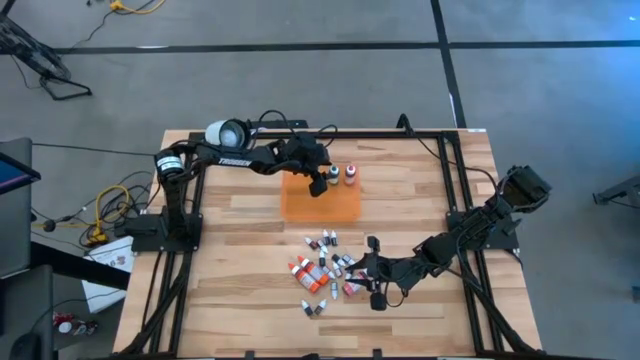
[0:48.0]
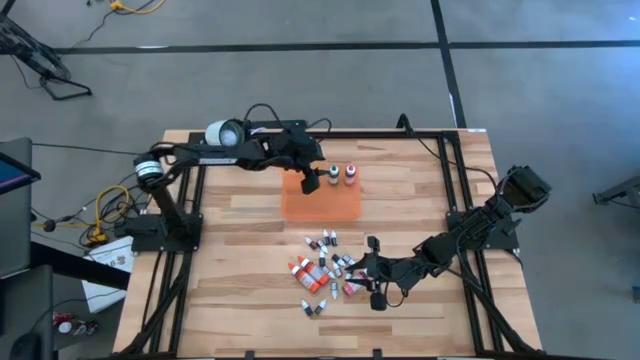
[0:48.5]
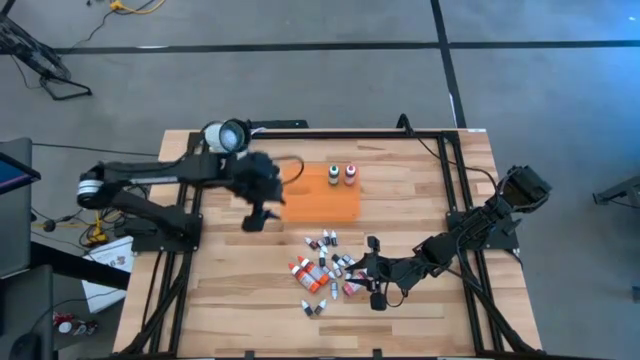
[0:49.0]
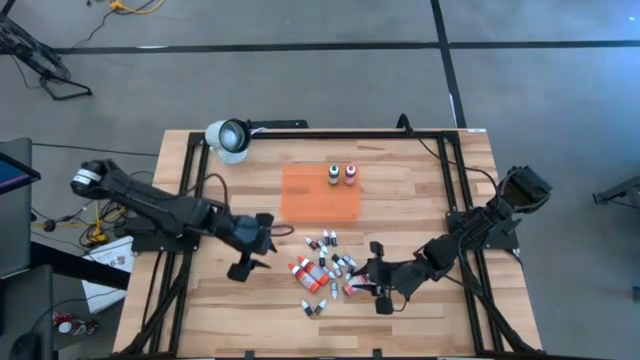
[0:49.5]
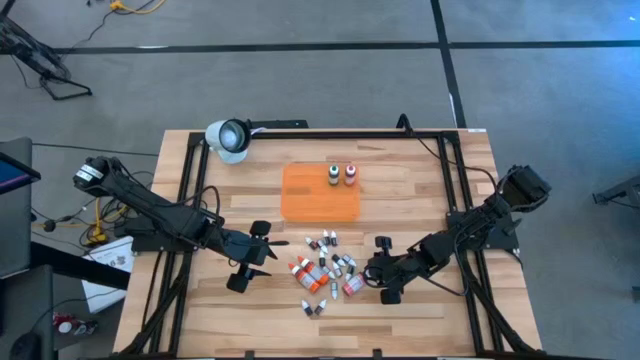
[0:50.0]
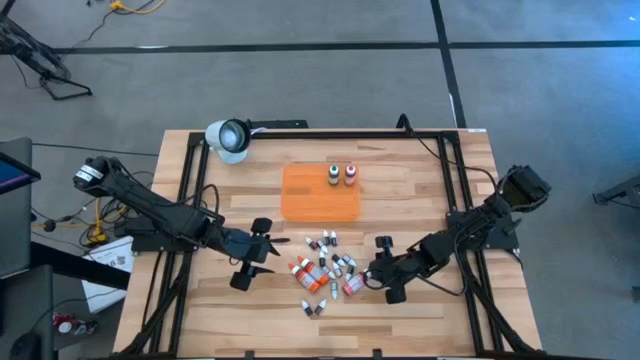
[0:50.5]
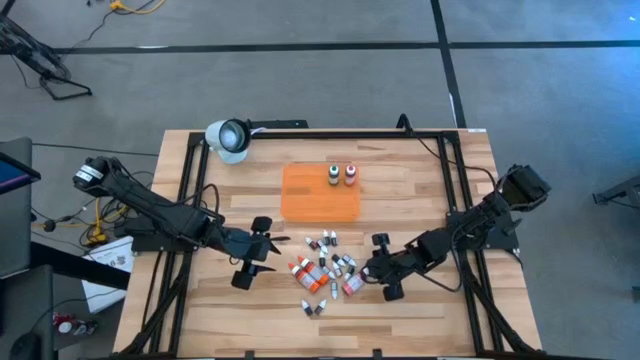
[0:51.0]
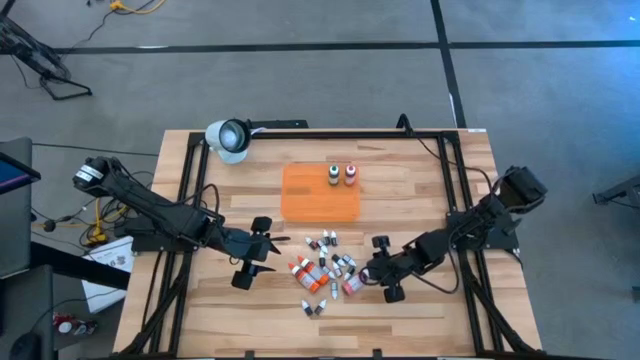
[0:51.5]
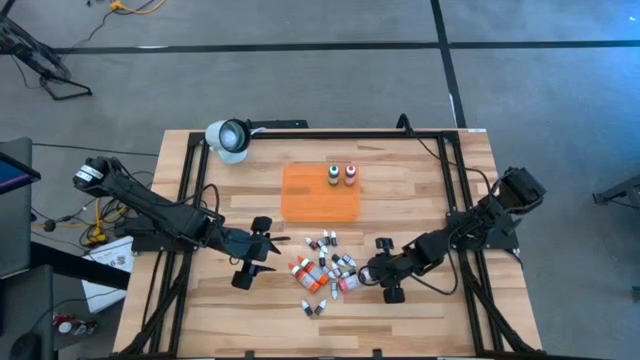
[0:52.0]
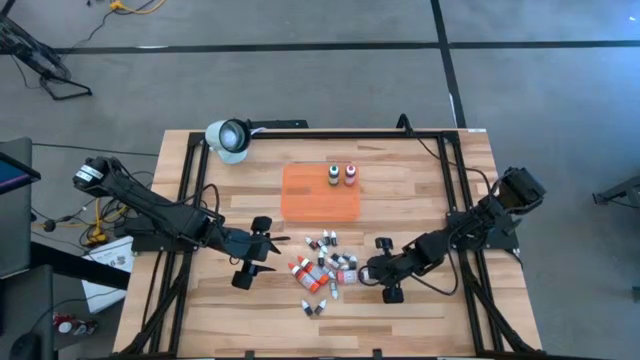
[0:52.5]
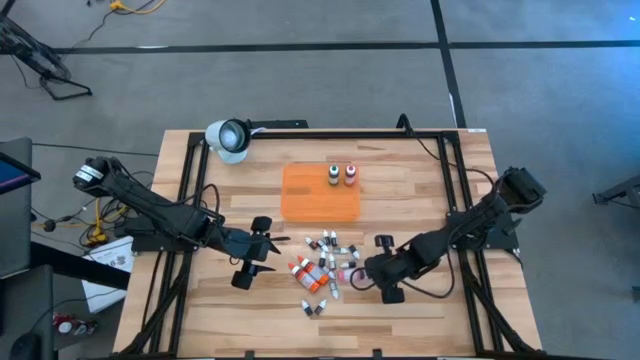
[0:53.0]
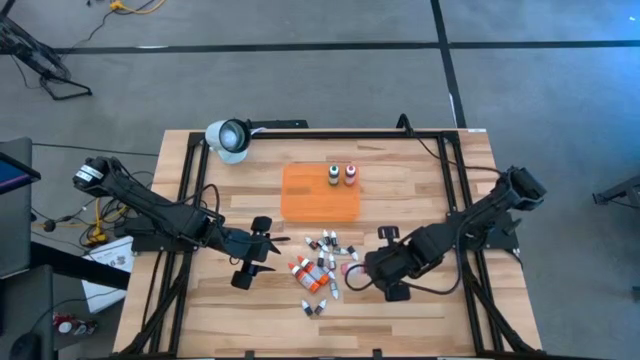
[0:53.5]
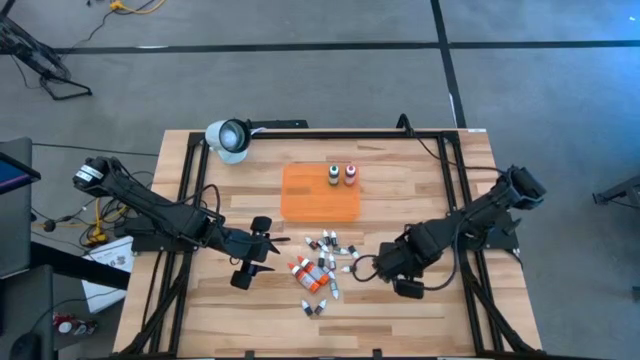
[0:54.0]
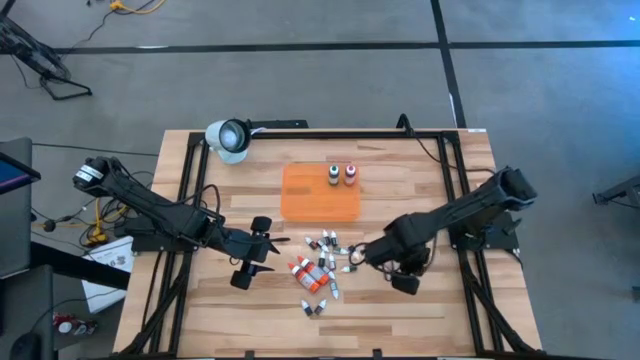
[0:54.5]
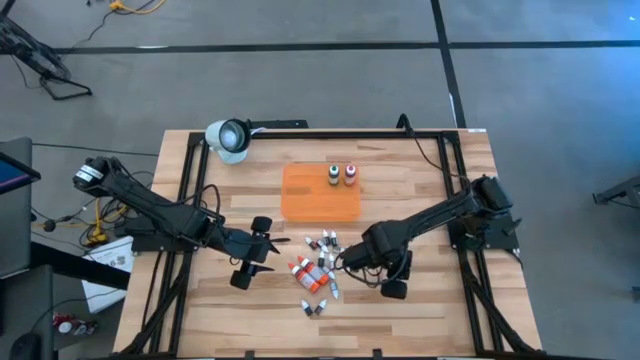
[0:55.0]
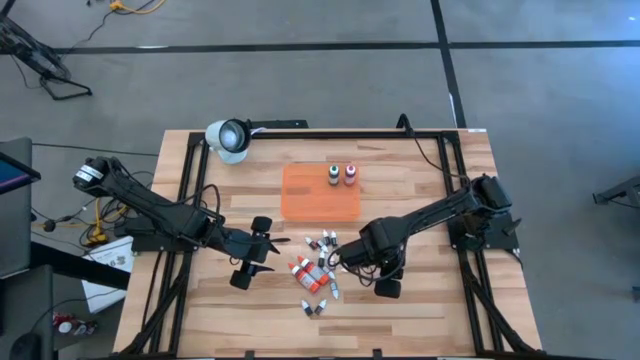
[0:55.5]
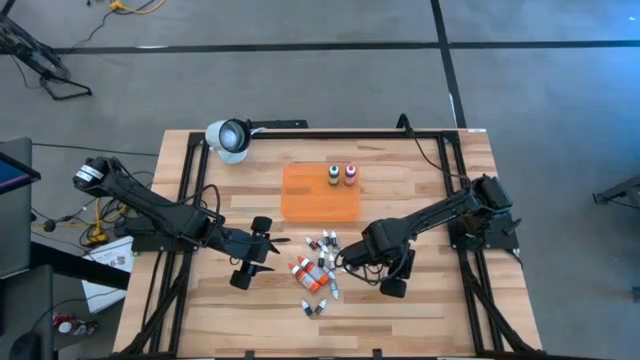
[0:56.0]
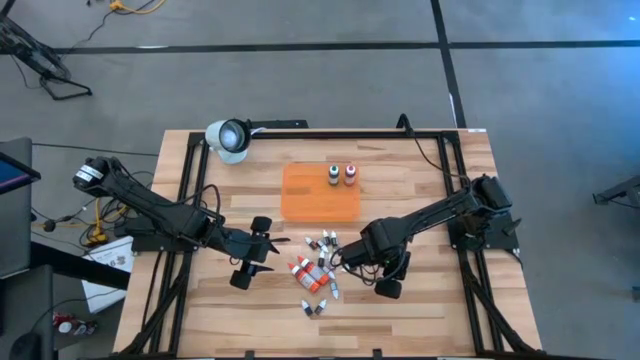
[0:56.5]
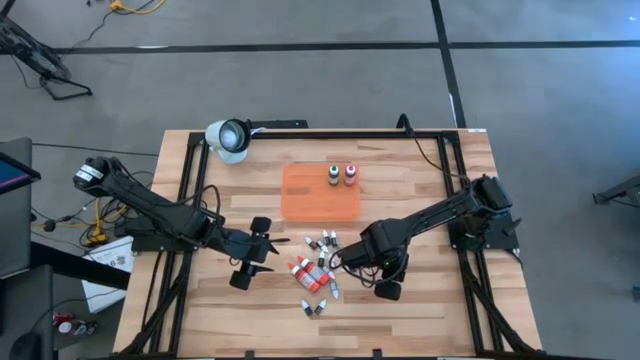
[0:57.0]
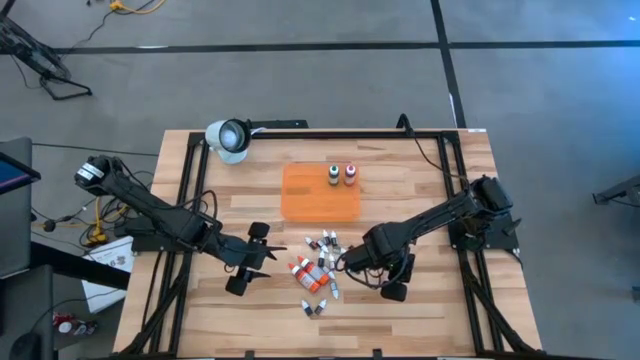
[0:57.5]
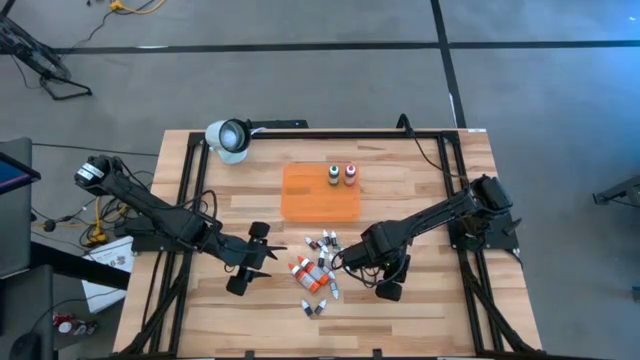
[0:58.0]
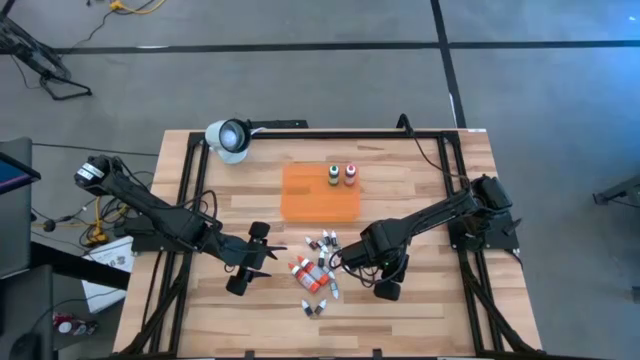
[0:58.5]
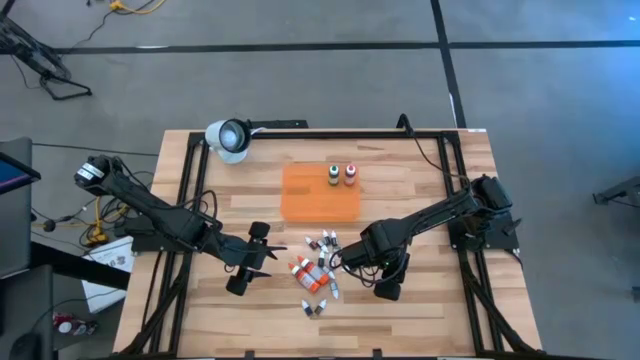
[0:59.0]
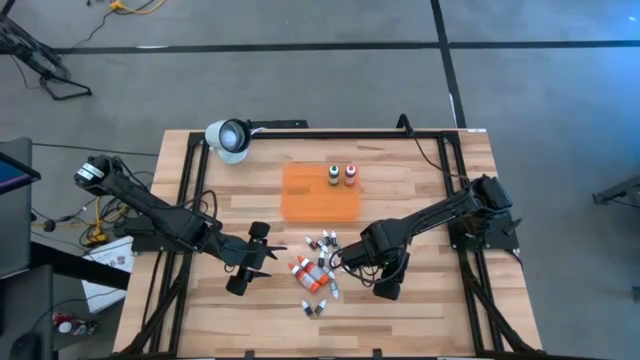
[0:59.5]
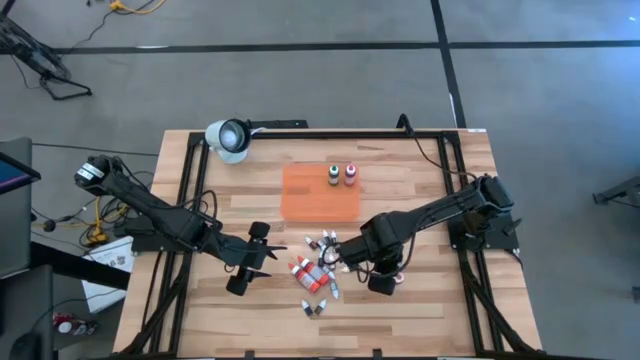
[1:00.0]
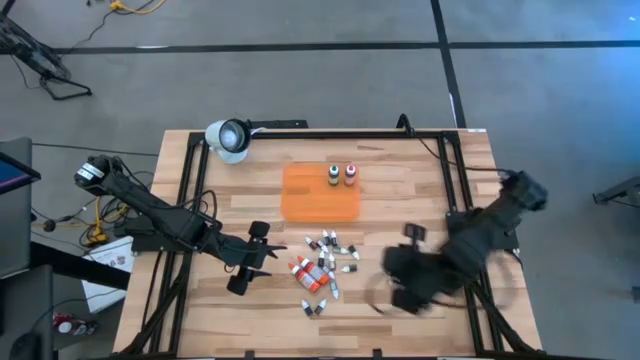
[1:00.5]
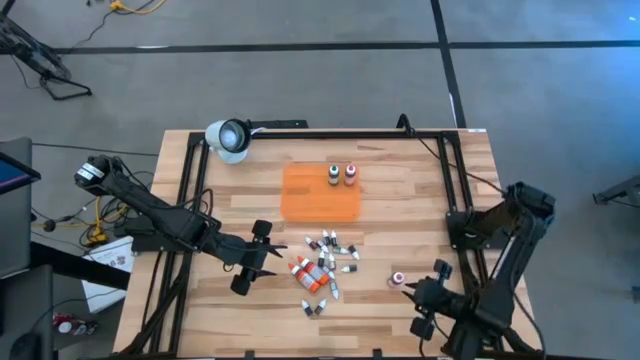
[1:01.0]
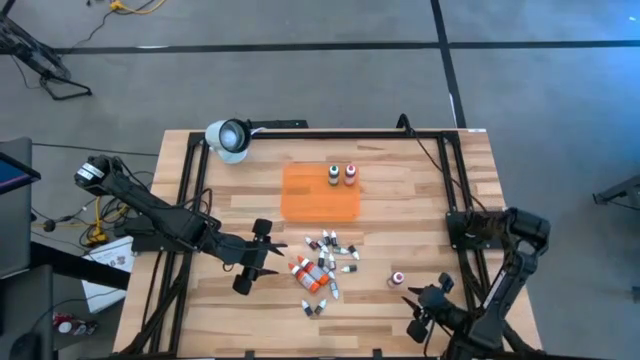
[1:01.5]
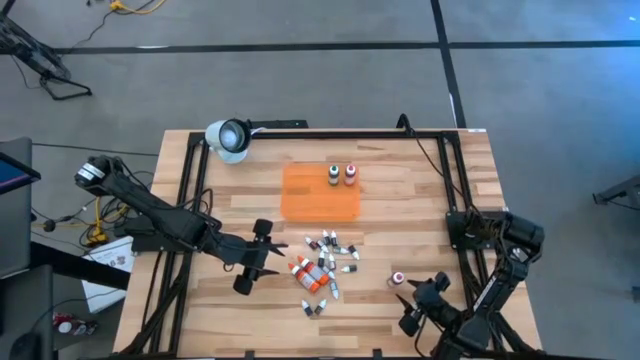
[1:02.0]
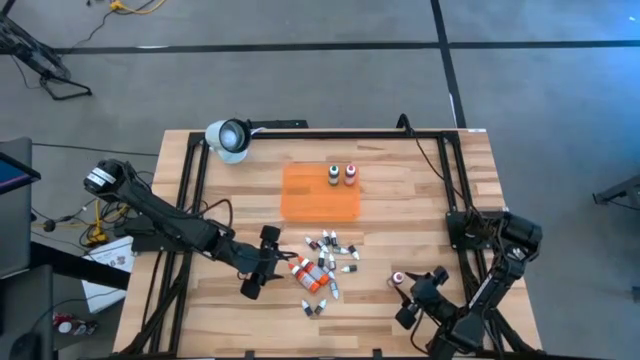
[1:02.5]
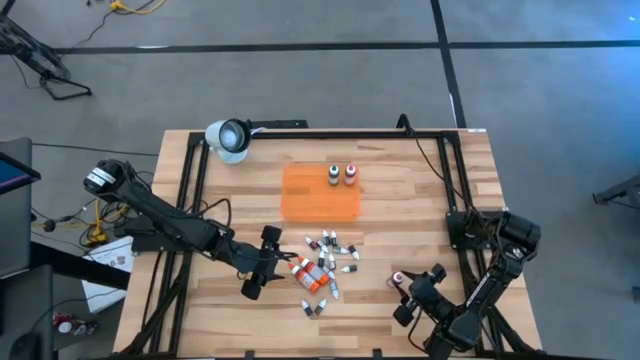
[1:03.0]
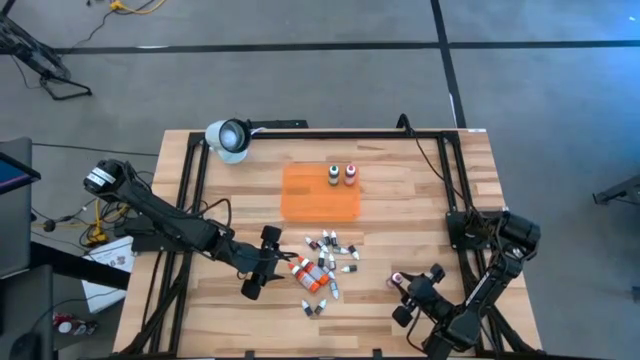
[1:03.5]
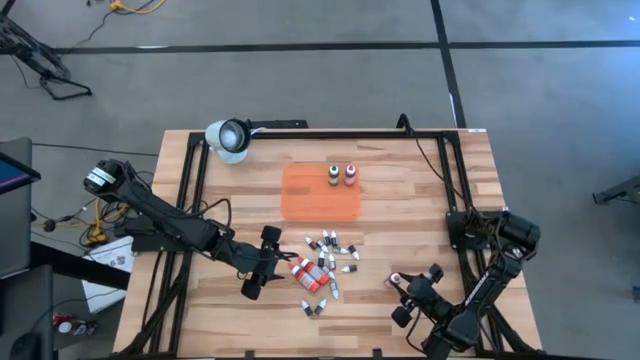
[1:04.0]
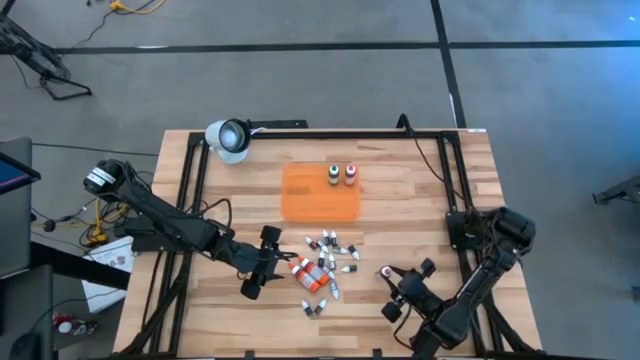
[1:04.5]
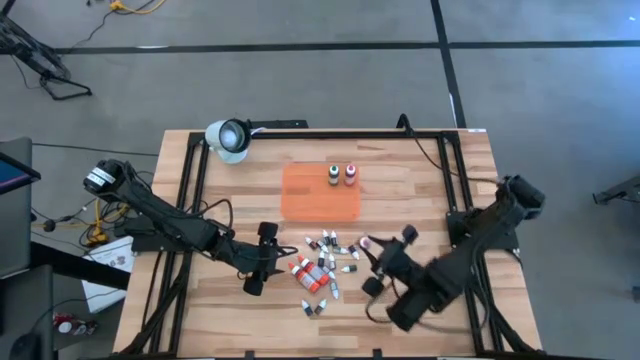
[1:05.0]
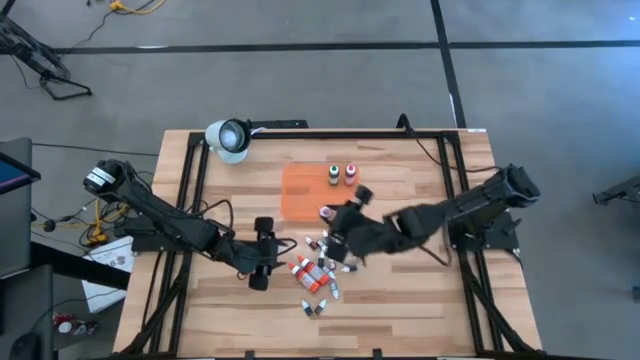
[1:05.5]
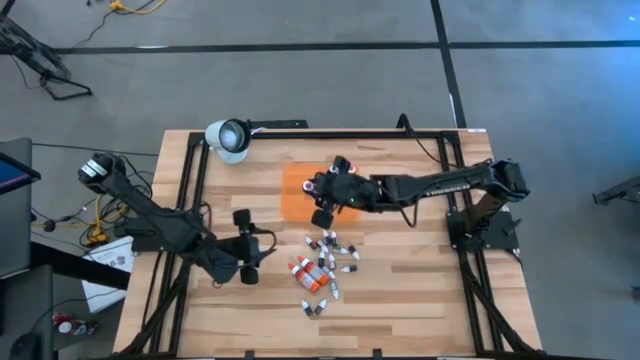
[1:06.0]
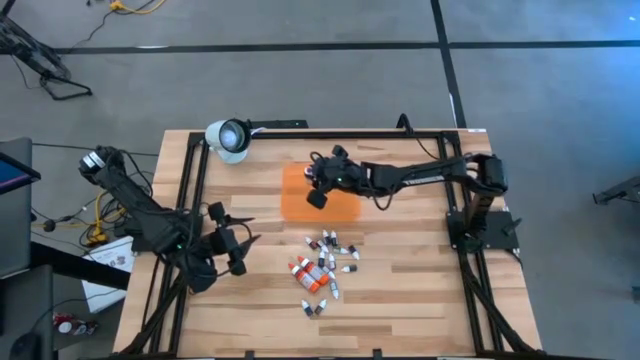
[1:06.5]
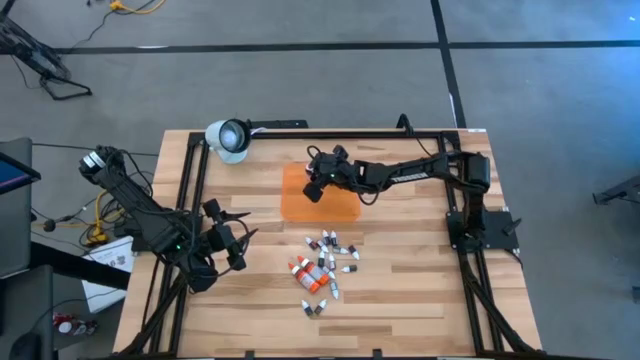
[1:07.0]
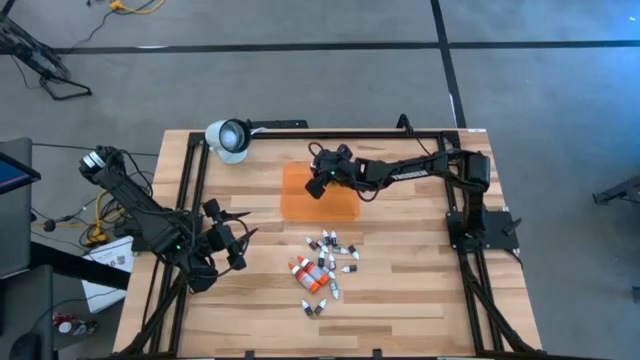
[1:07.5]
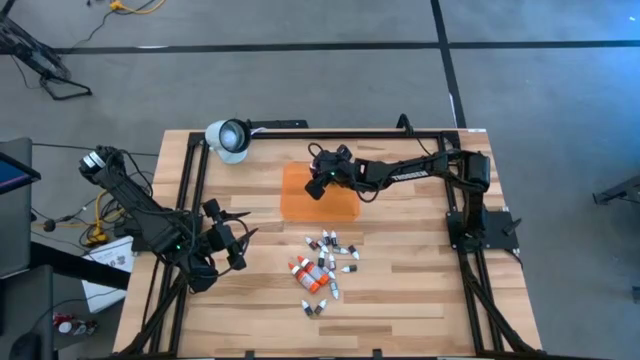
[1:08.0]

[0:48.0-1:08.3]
Task: Pick & Place food coloring
Put the big pink food coloring bottle into the orange bin

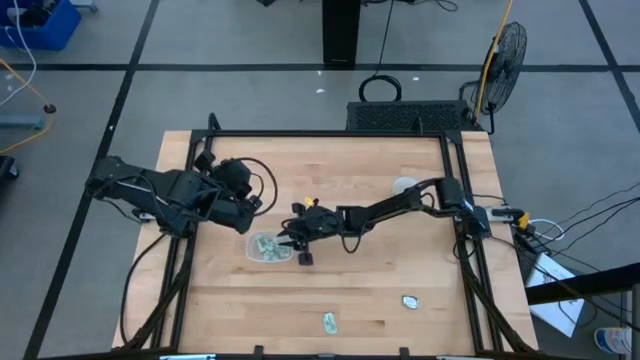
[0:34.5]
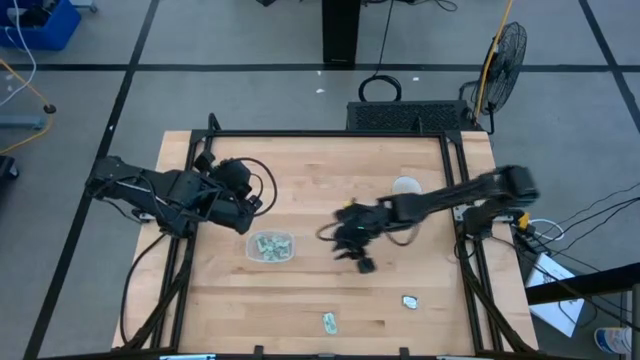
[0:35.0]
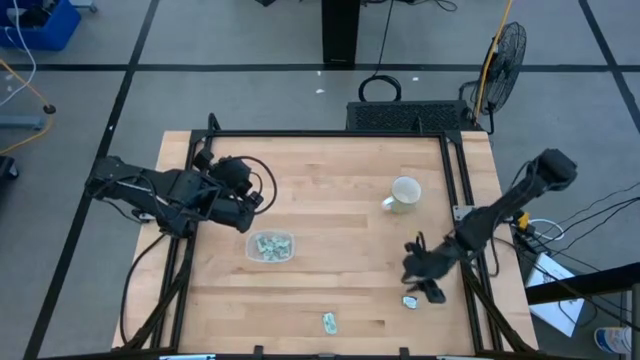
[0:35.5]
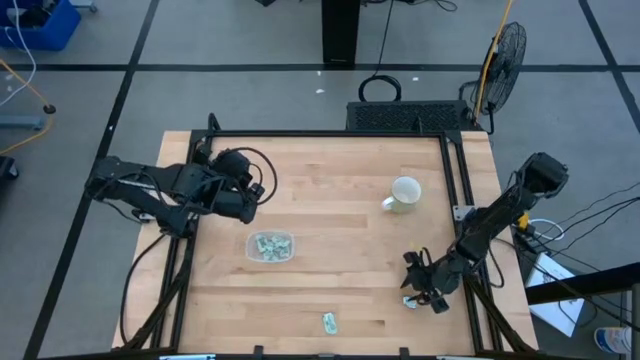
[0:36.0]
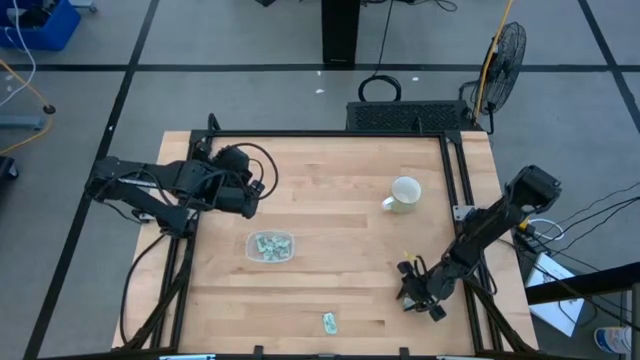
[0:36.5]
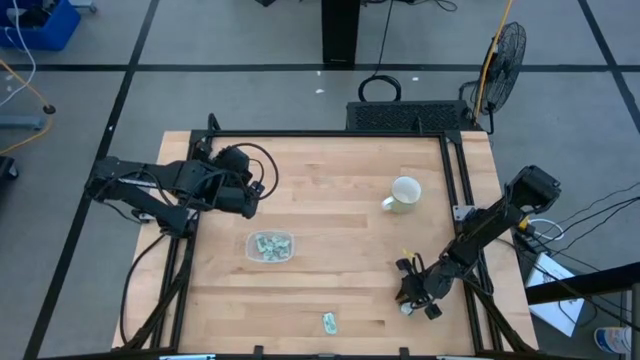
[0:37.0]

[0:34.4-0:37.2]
Task: Pick and place Stevia / Truvia into bins
Put the stevia packet into the transparent bin
